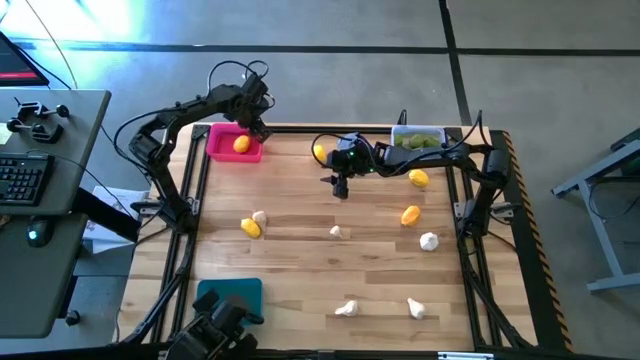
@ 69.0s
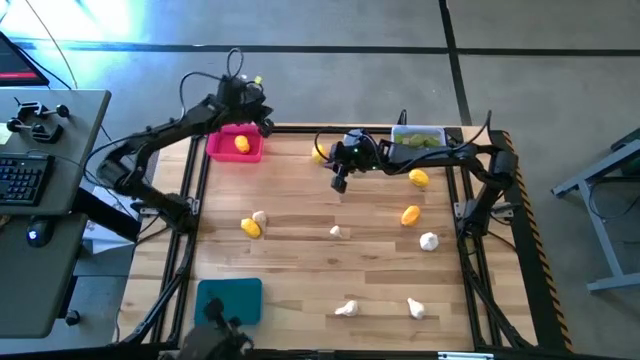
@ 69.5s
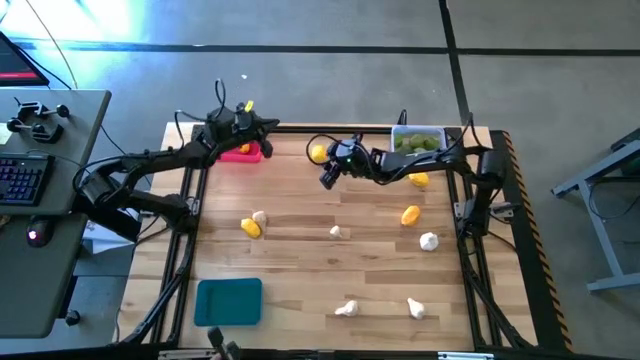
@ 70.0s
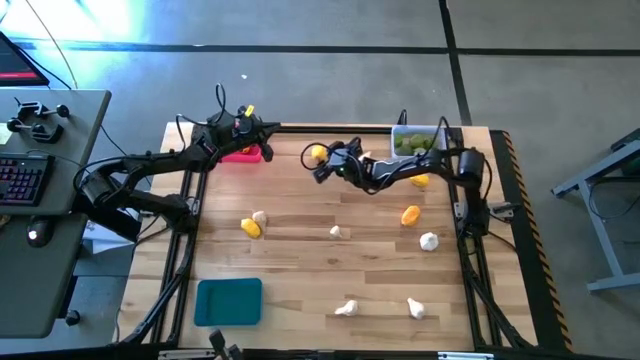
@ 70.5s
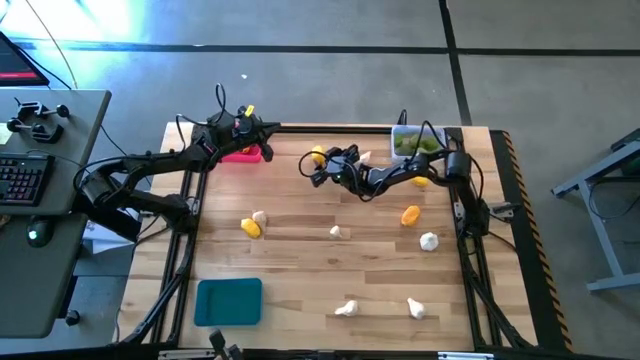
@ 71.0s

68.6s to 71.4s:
Task: Sort produce into baskets
Put the top center lemon into the pink bin

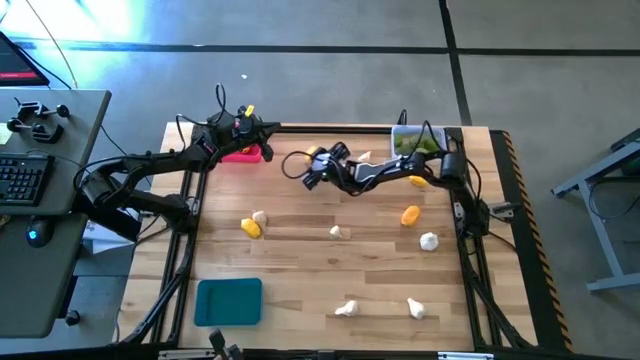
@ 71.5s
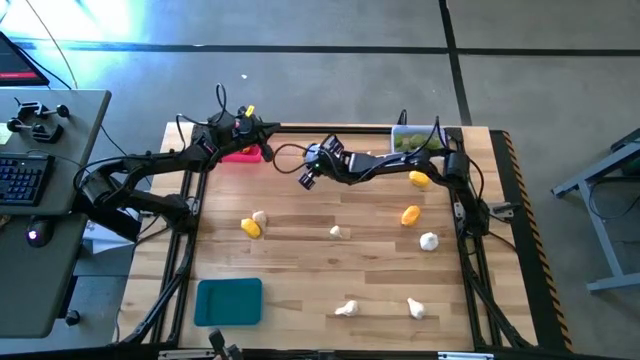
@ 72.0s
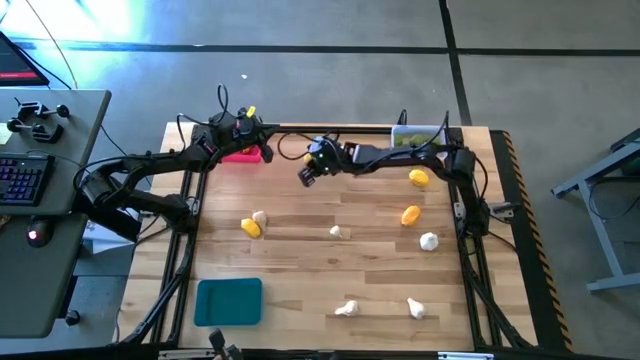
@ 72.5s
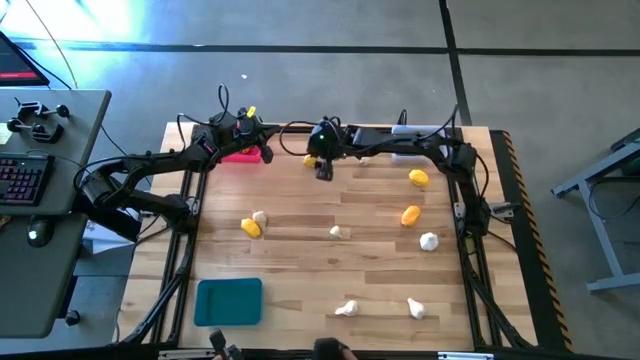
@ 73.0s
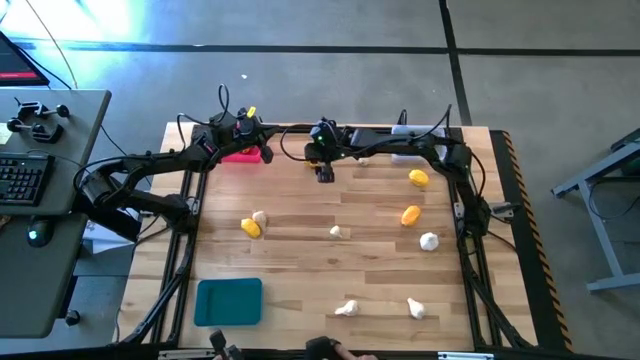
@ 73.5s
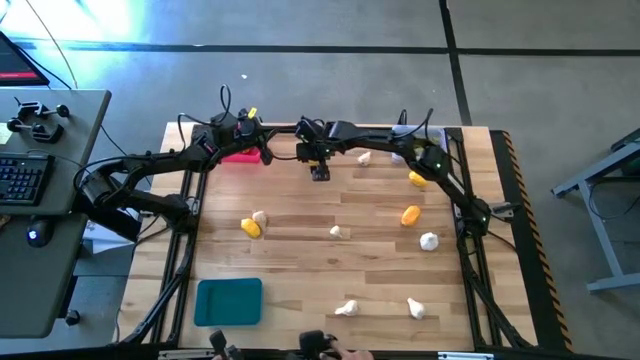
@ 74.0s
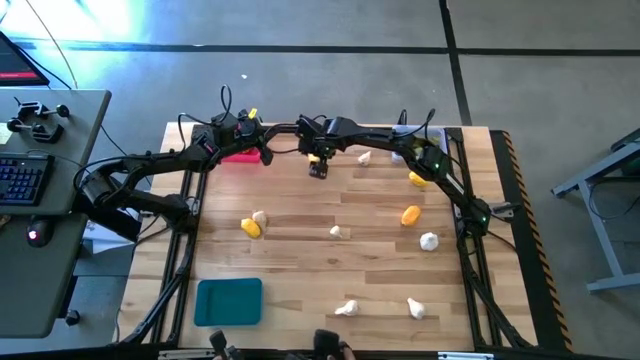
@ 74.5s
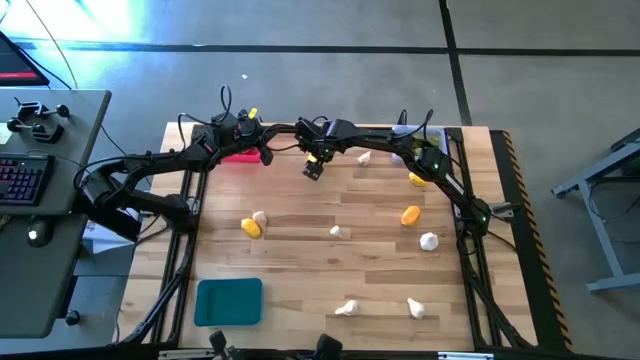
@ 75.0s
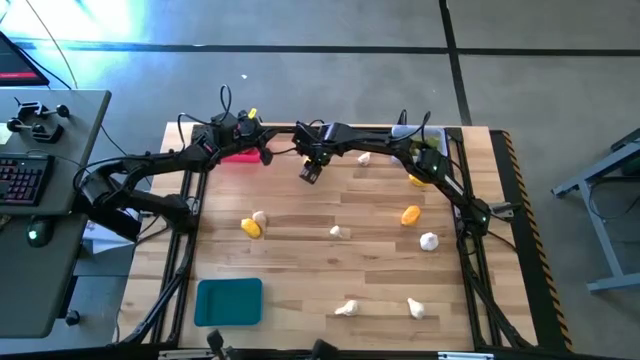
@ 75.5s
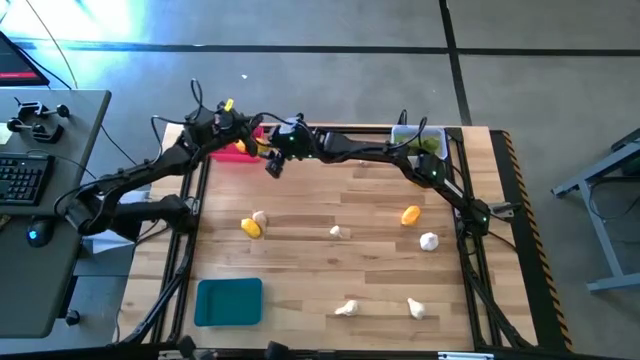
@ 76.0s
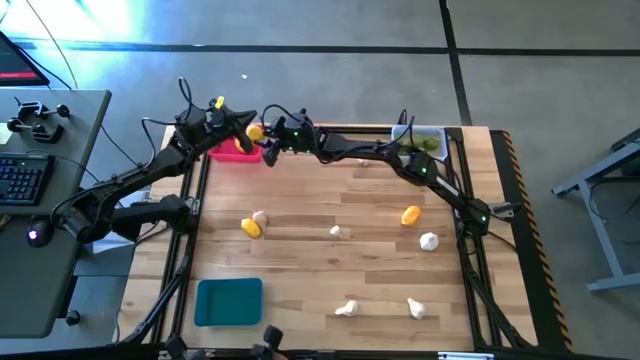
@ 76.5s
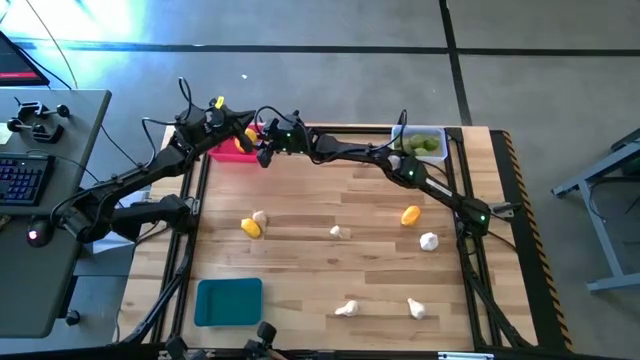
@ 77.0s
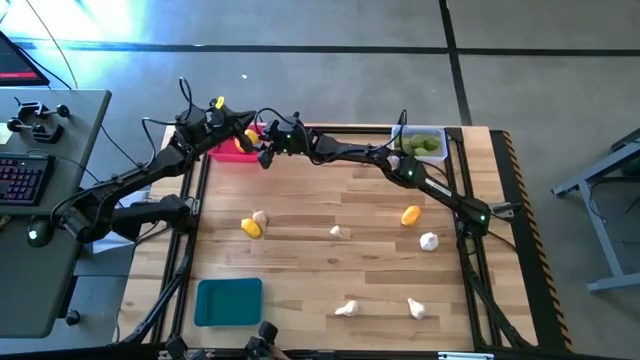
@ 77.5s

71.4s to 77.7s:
Put the top center lemon into the pink bin

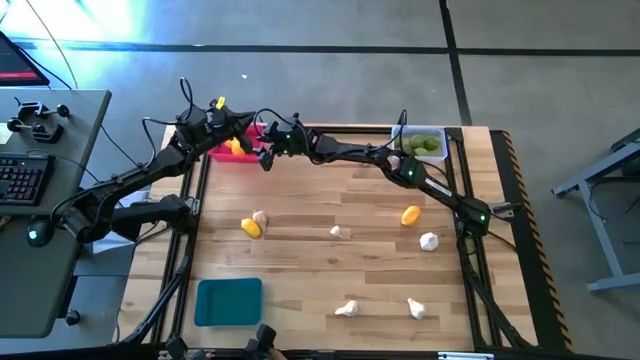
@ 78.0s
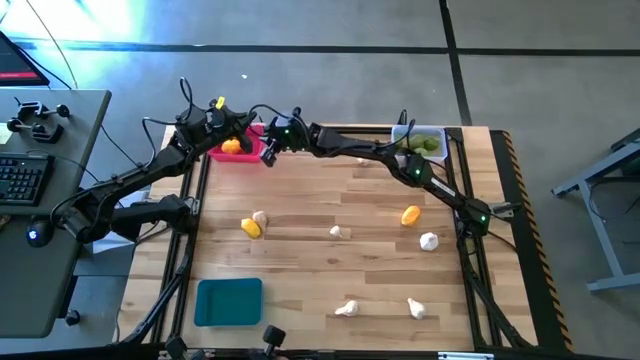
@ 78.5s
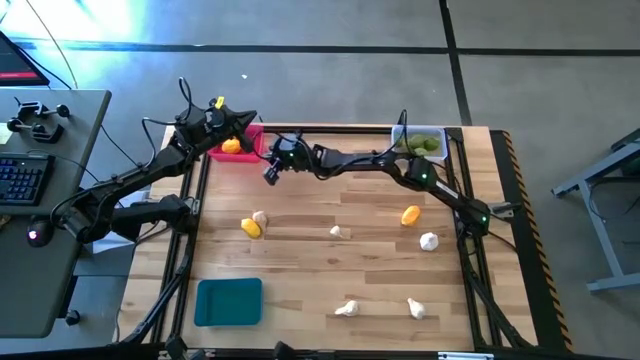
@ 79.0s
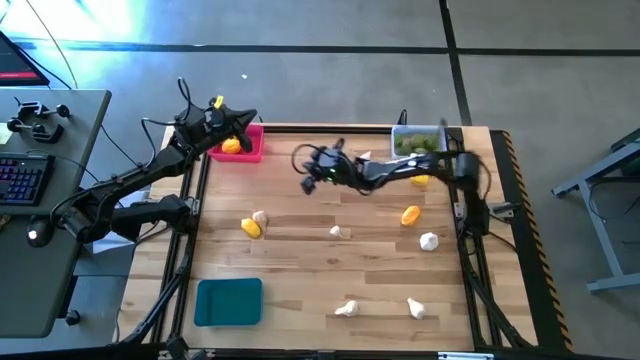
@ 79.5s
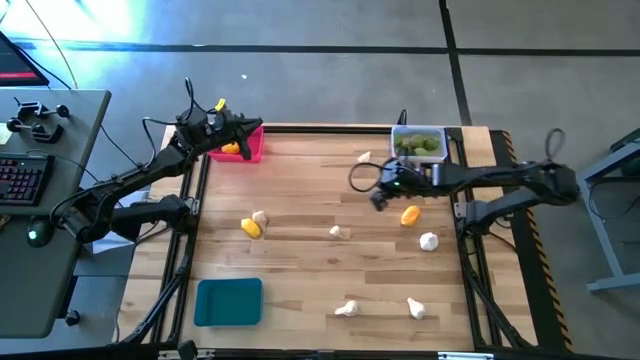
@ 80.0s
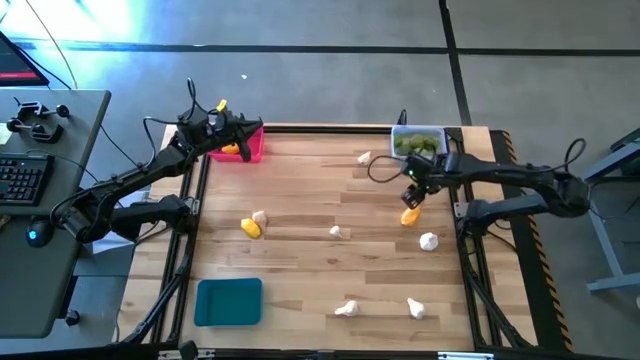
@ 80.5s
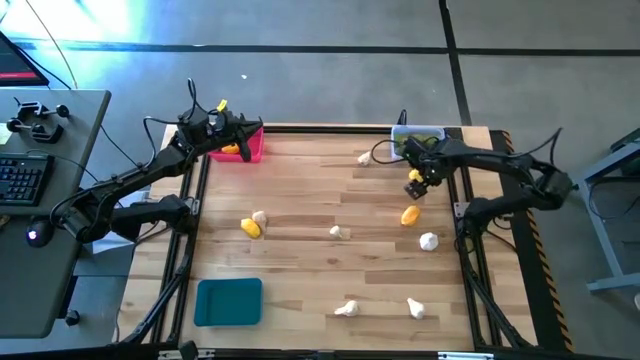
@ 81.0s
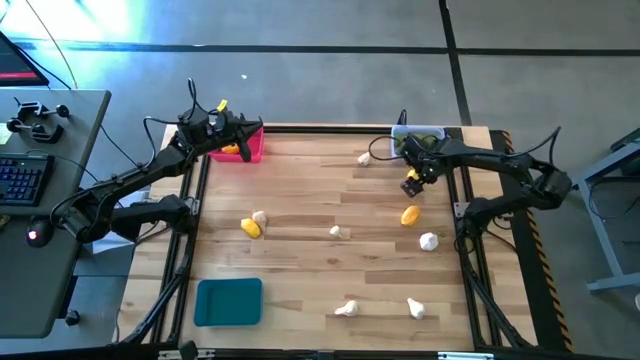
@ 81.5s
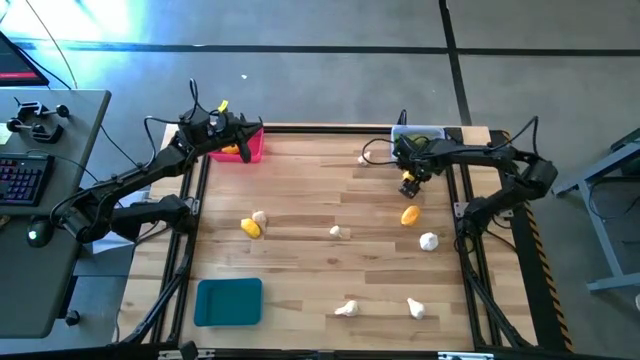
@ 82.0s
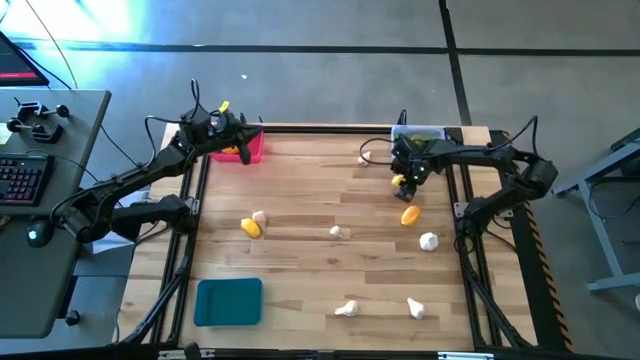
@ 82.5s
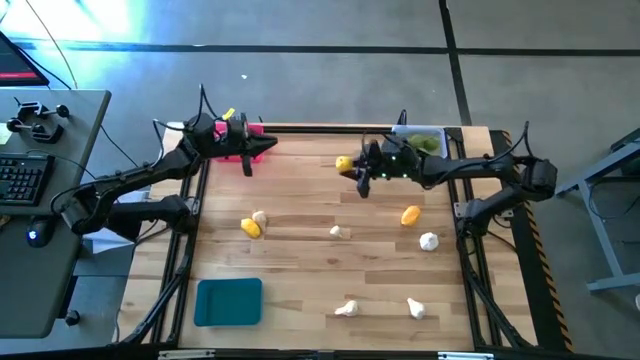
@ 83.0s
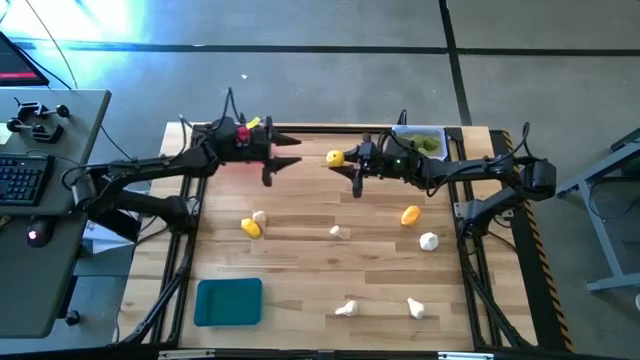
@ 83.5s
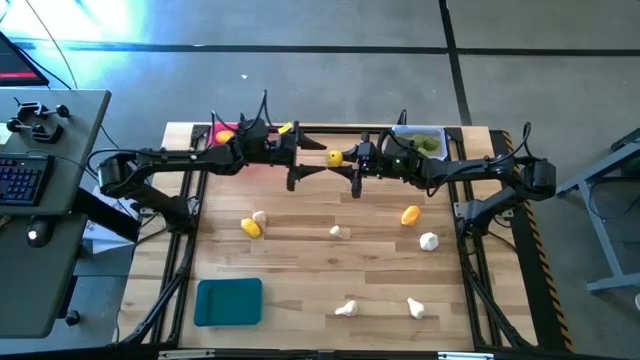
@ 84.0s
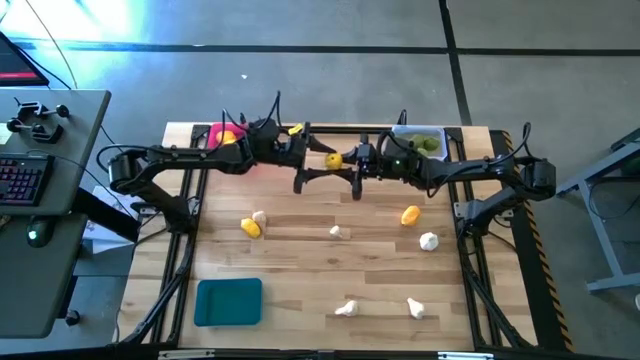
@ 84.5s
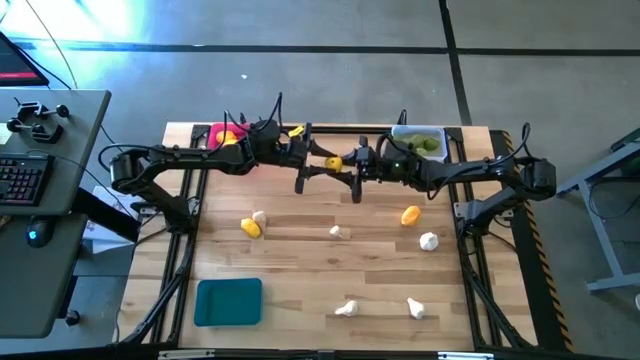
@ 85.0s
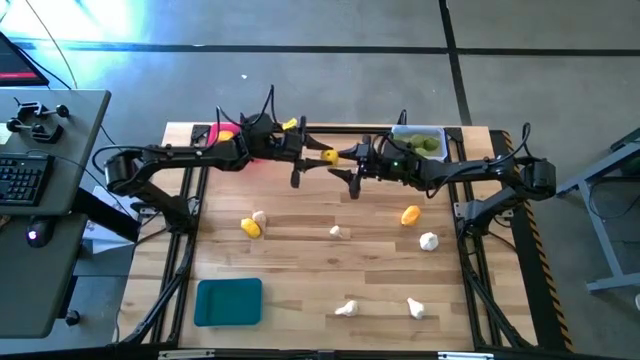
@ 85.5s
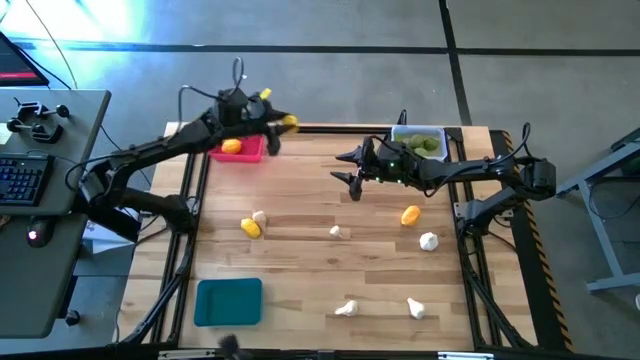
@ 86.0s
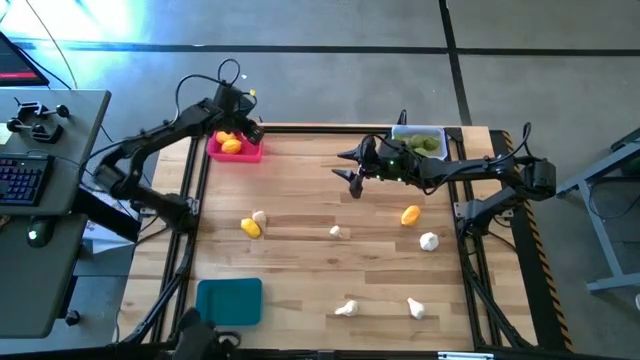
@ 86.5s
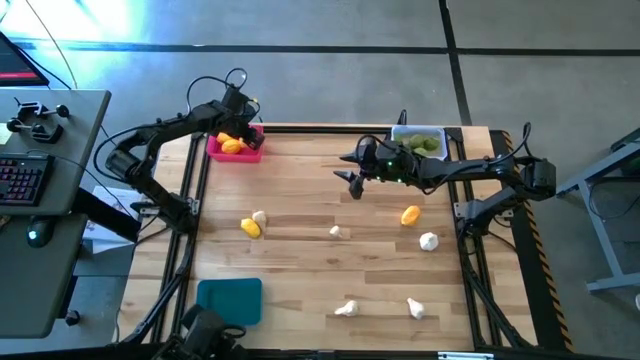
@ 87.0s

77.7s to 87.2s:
Put the top right lemon into the pink bin

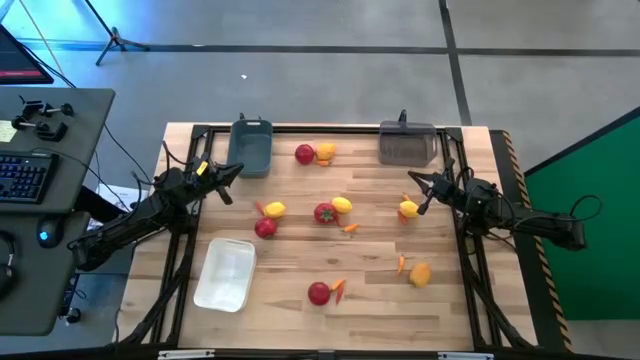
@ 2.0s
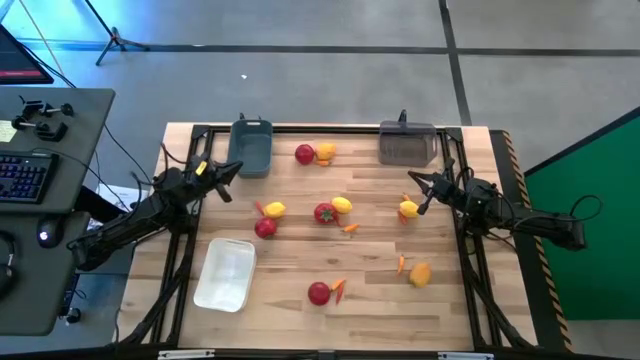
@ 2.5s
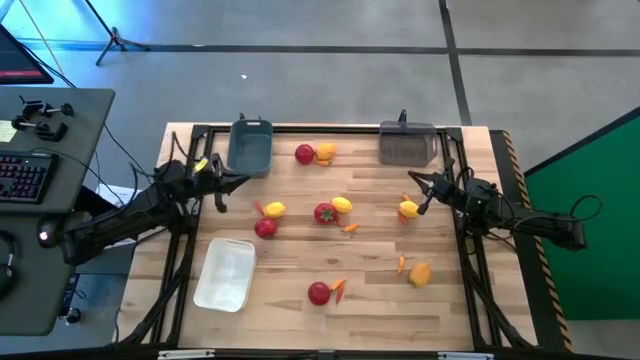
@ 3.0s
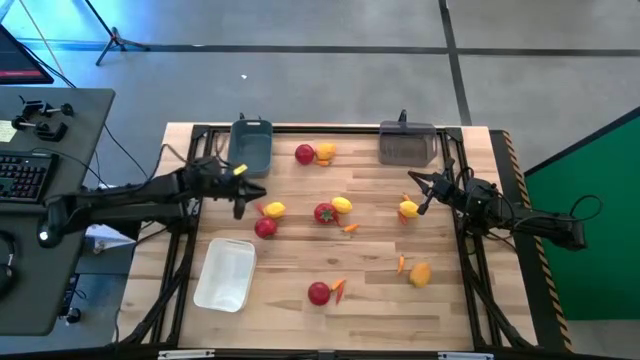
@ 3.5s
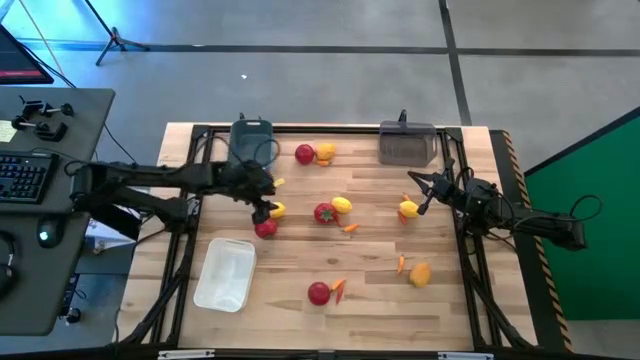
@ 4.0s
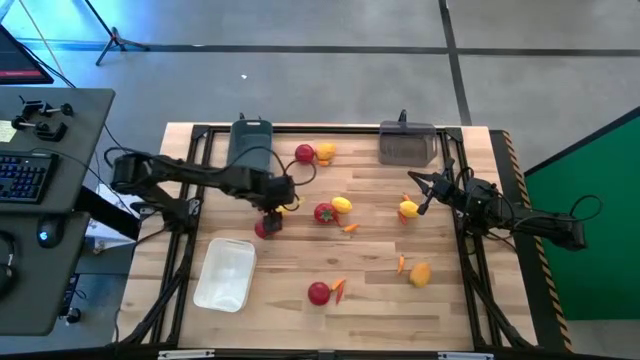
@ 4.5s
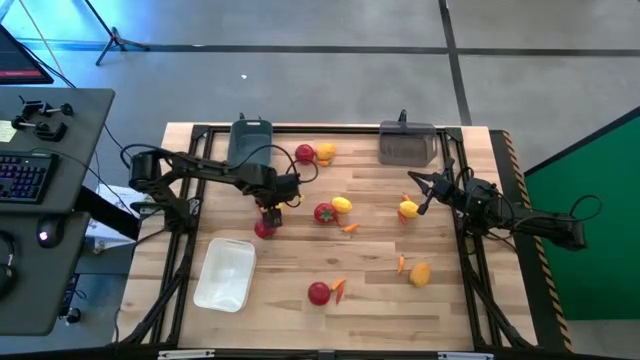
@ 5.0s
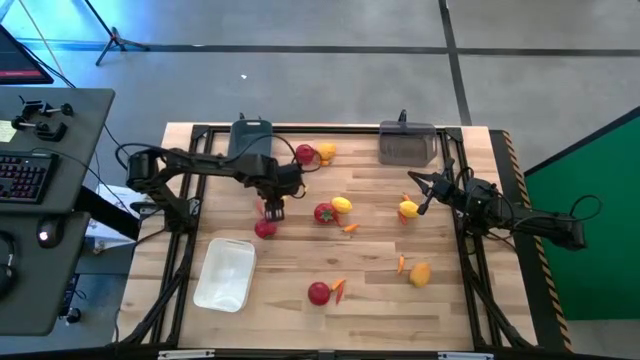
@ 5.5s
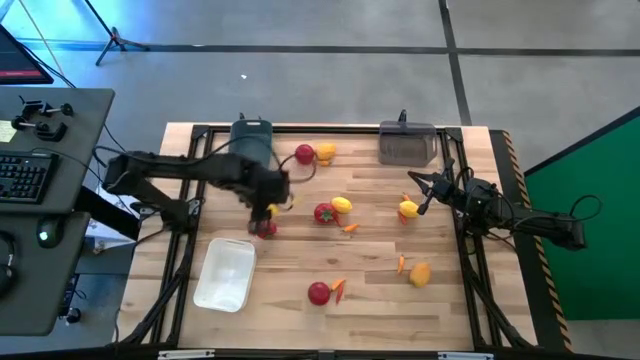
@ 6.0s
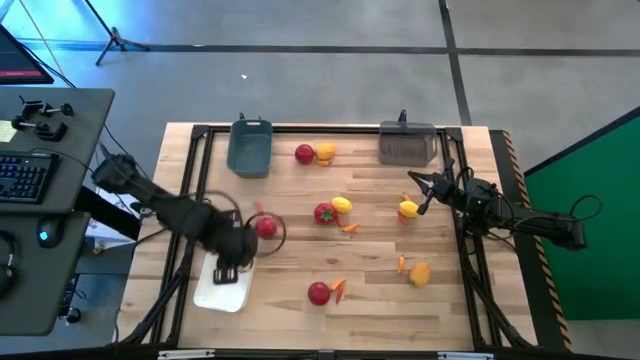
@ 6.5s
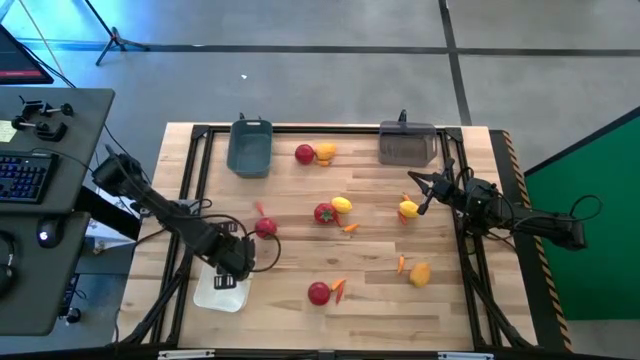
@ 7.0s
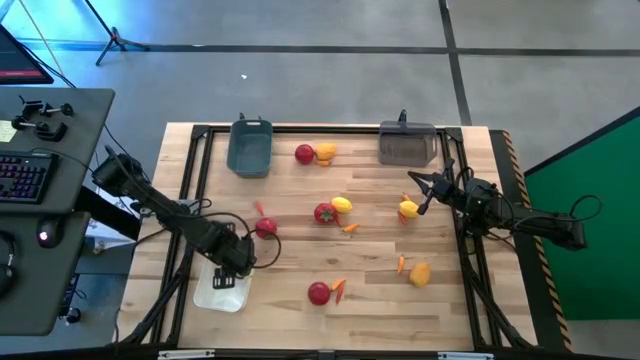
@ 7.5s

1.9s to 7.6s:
Task: Sort produce into baskets
Put the yellow lemon into the white bin
